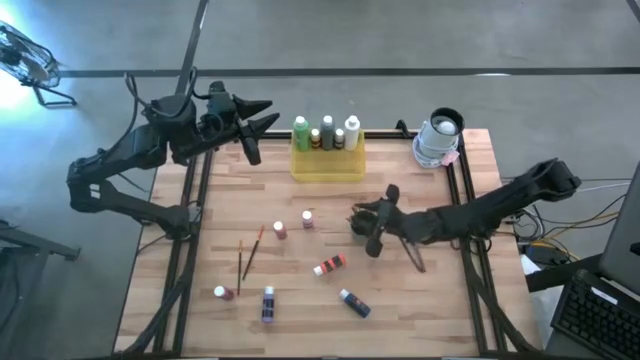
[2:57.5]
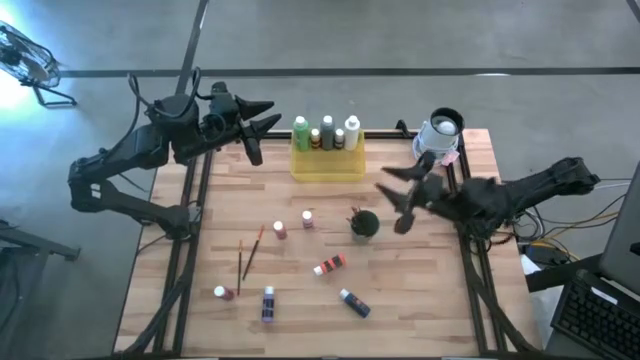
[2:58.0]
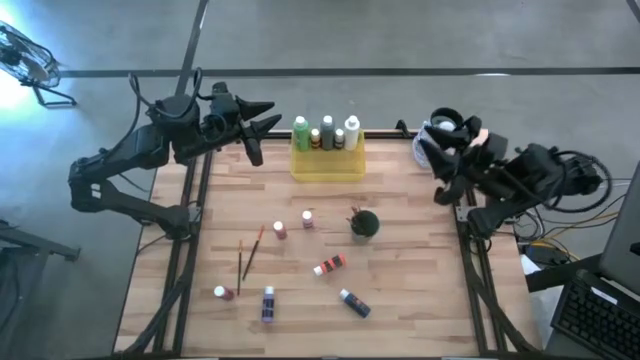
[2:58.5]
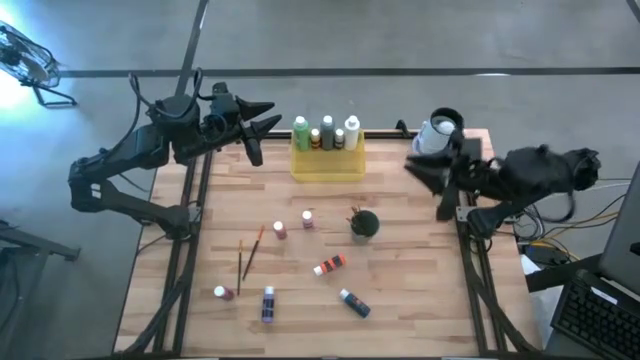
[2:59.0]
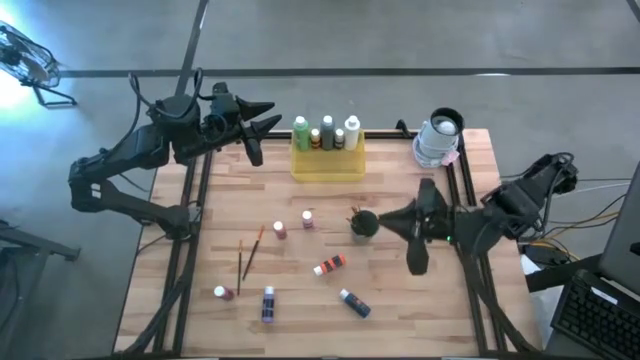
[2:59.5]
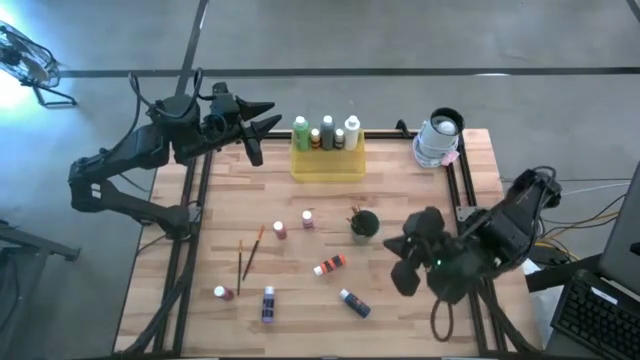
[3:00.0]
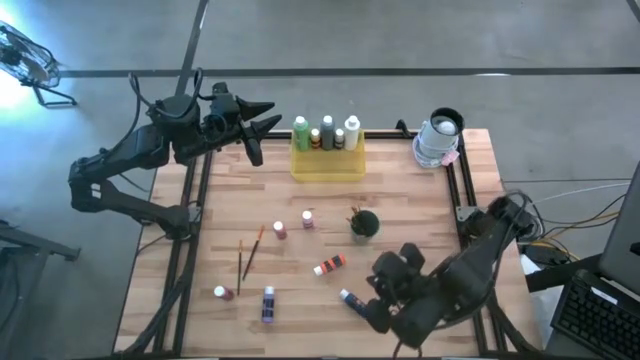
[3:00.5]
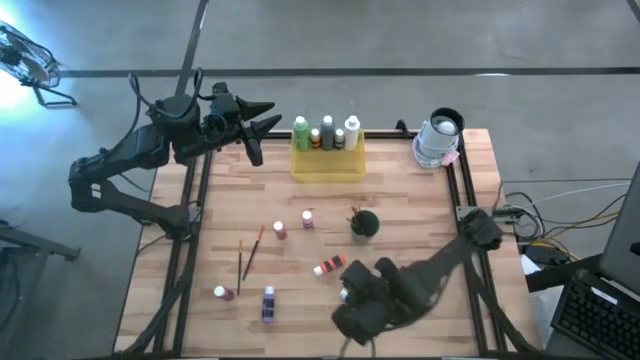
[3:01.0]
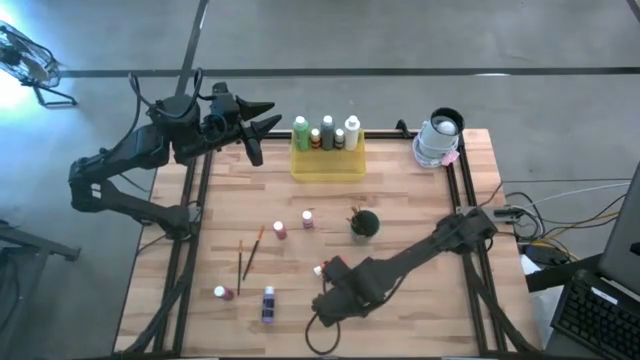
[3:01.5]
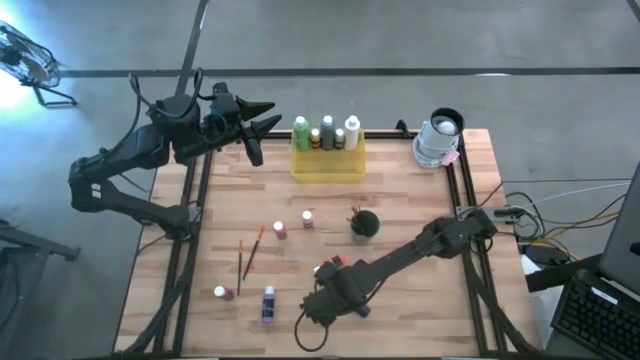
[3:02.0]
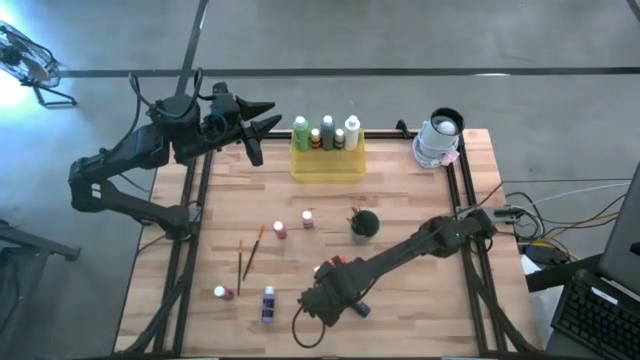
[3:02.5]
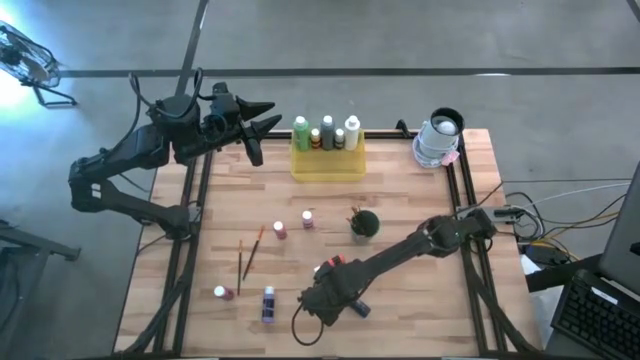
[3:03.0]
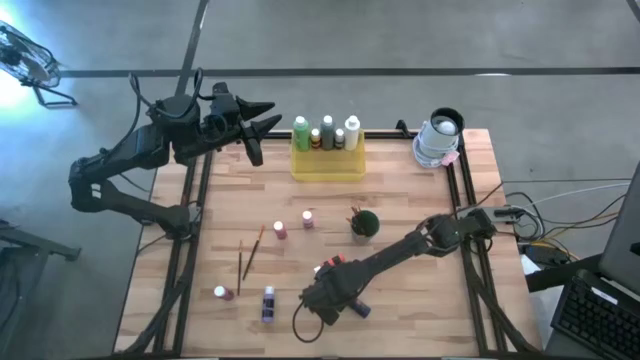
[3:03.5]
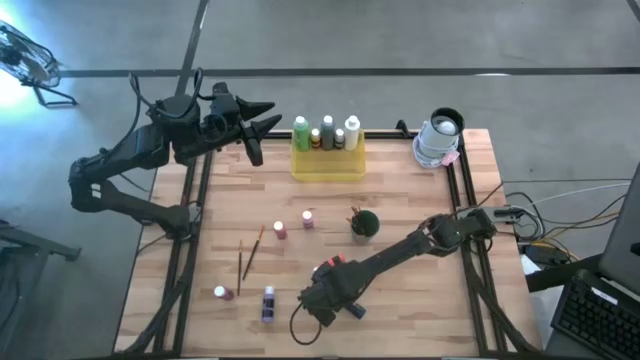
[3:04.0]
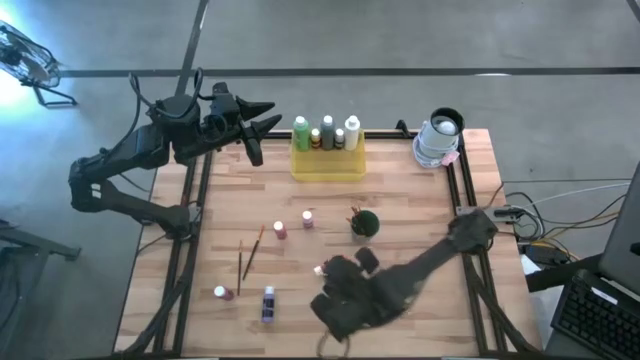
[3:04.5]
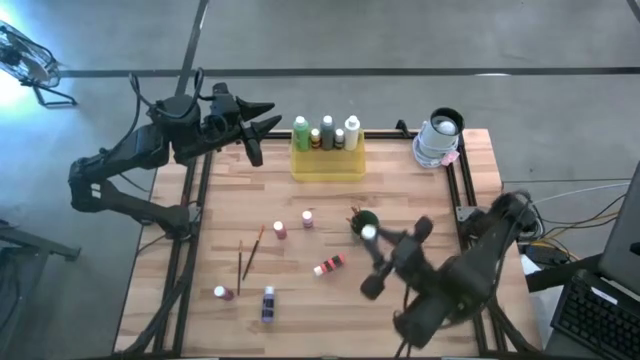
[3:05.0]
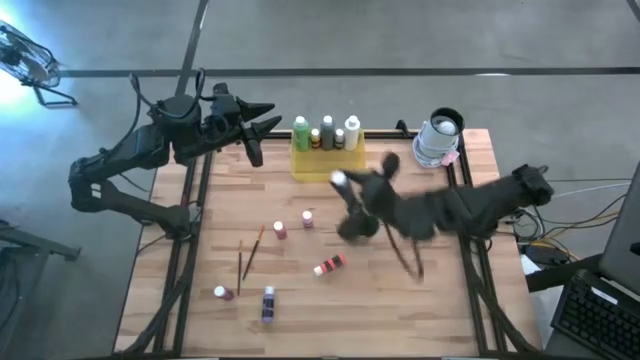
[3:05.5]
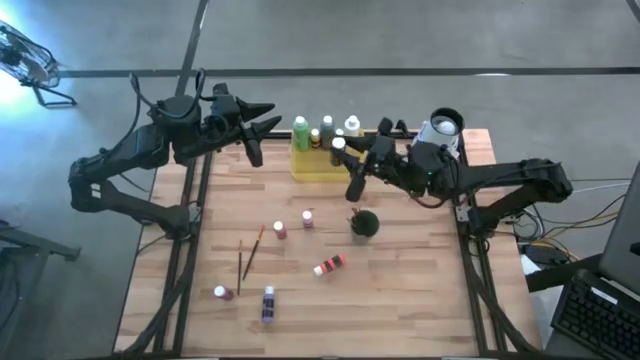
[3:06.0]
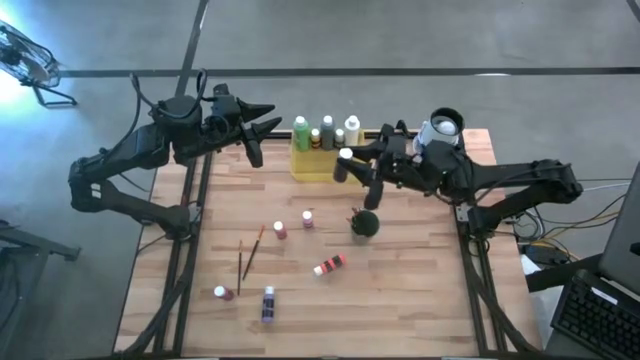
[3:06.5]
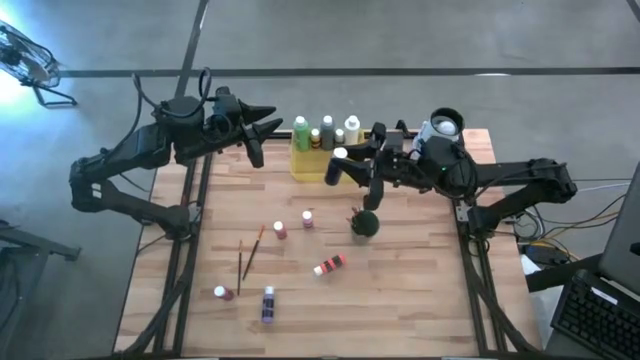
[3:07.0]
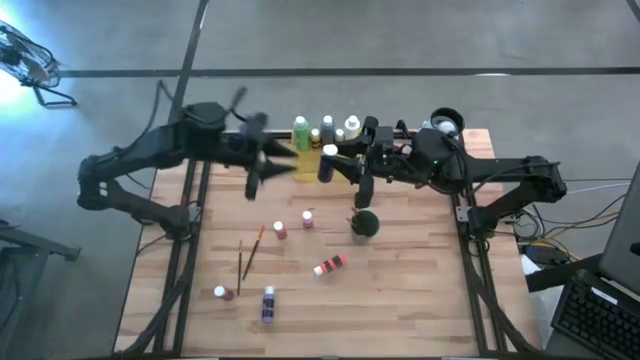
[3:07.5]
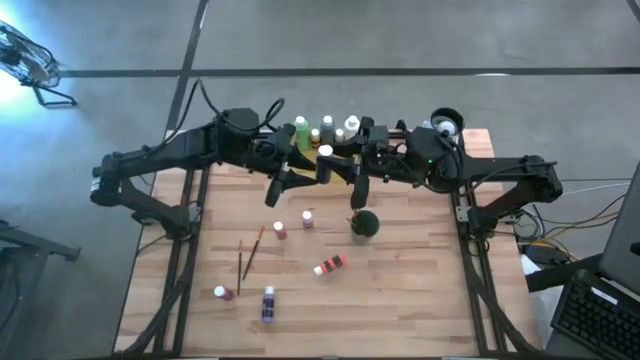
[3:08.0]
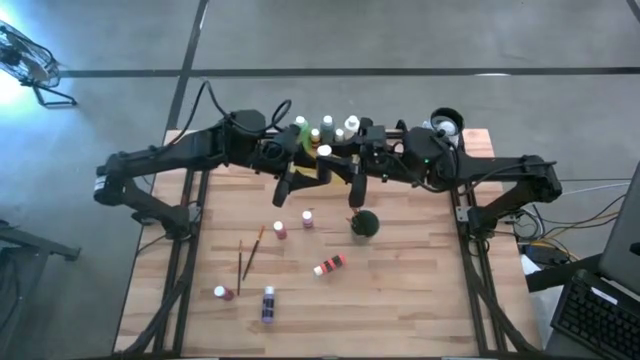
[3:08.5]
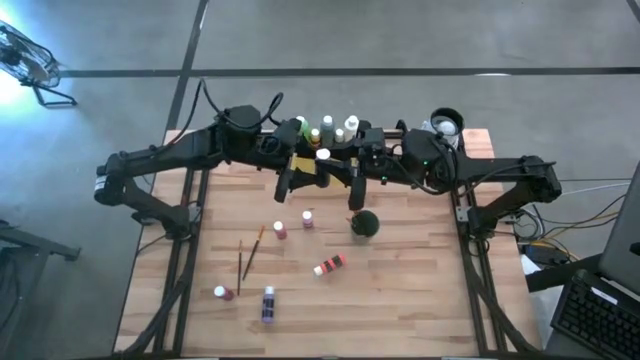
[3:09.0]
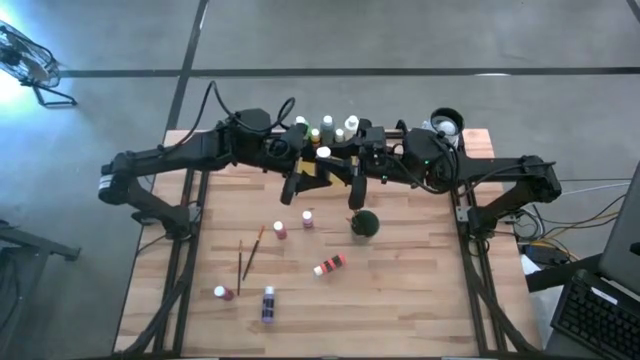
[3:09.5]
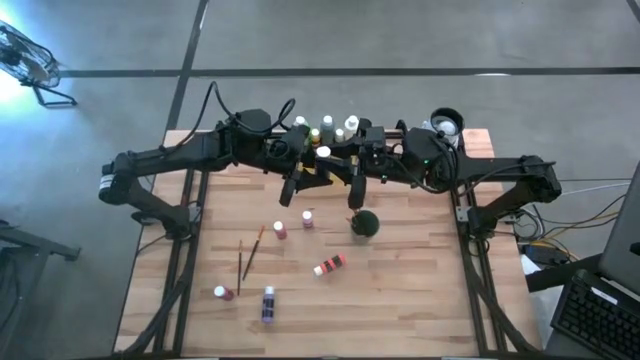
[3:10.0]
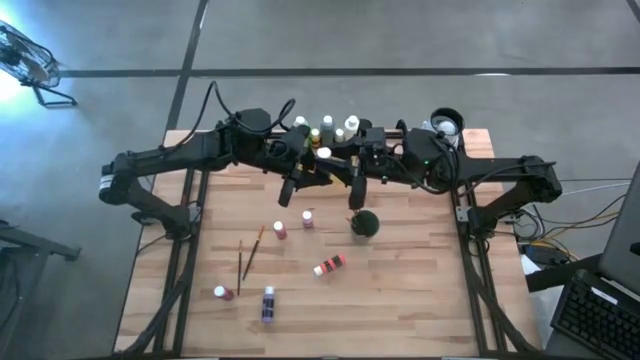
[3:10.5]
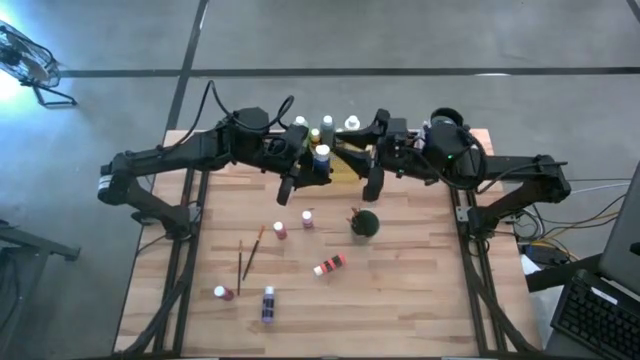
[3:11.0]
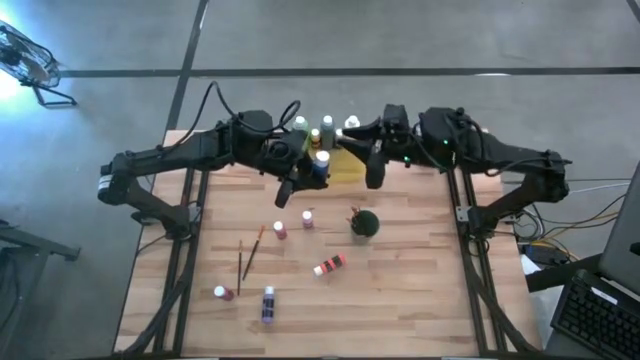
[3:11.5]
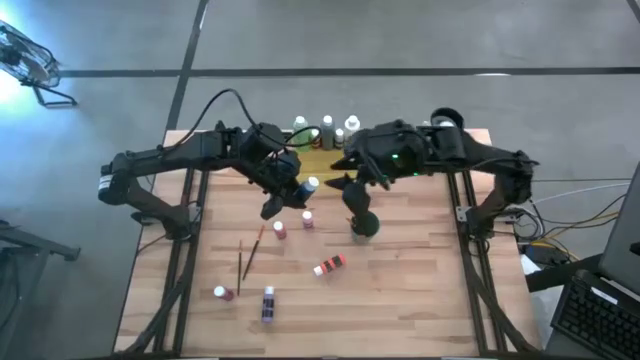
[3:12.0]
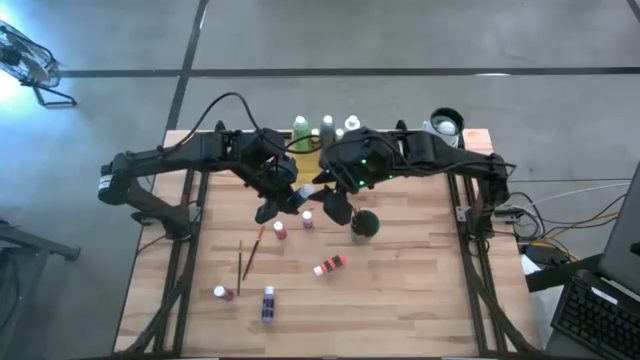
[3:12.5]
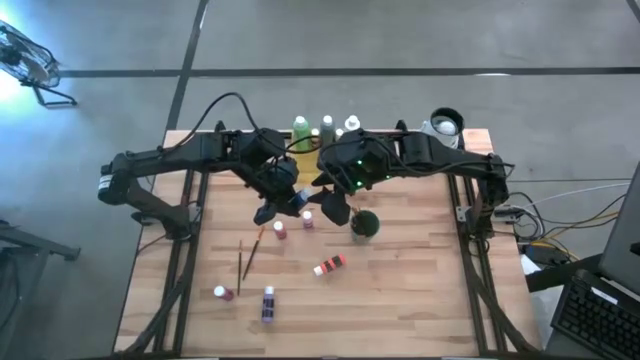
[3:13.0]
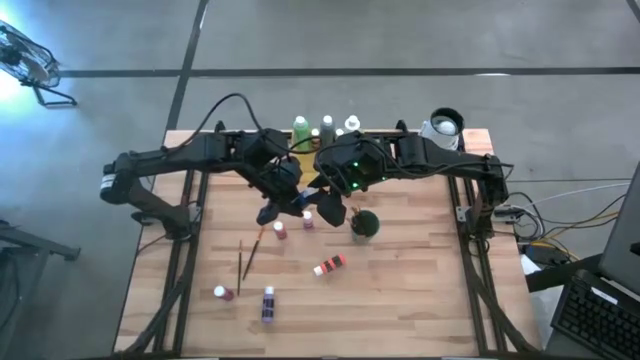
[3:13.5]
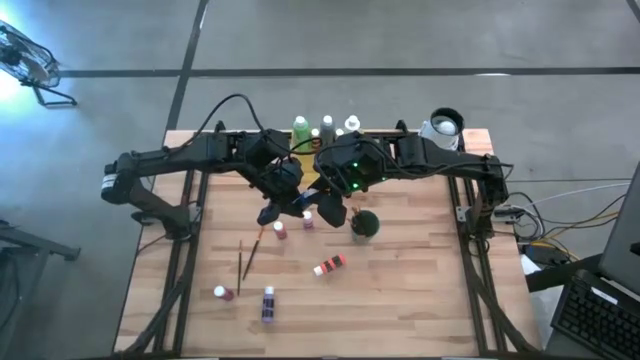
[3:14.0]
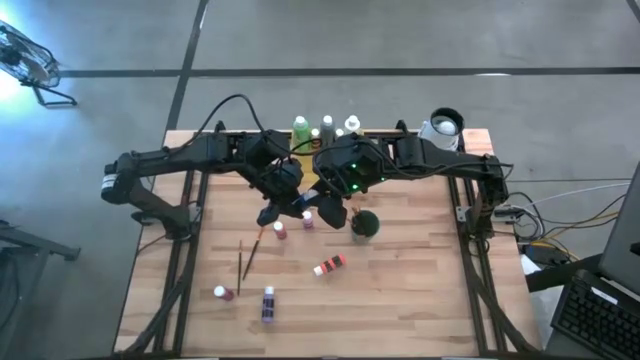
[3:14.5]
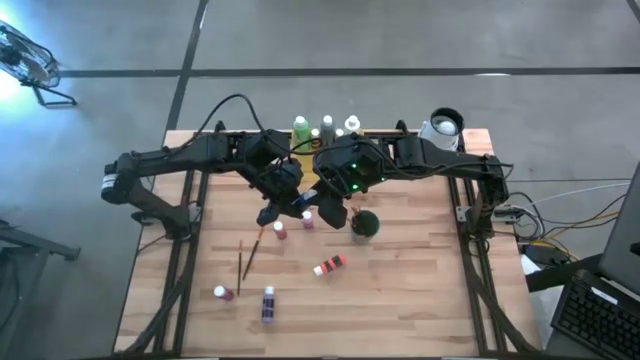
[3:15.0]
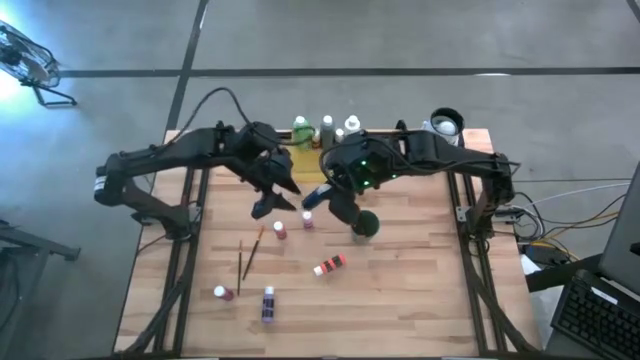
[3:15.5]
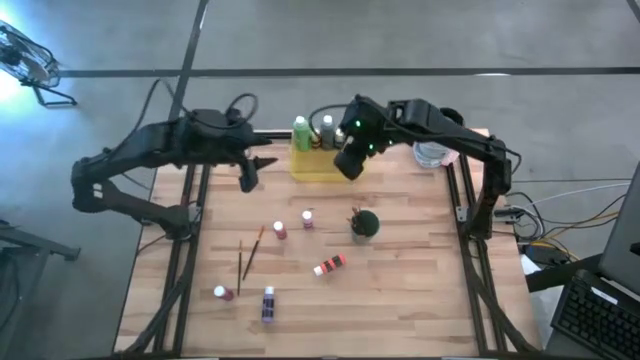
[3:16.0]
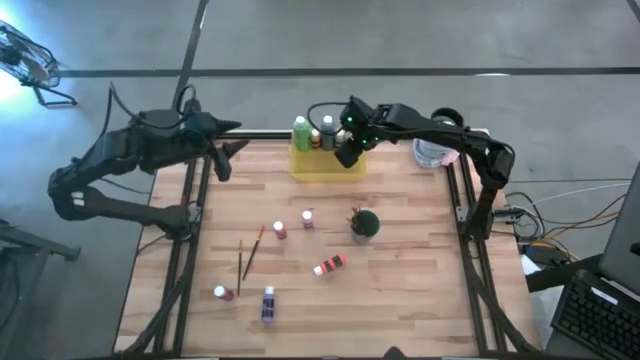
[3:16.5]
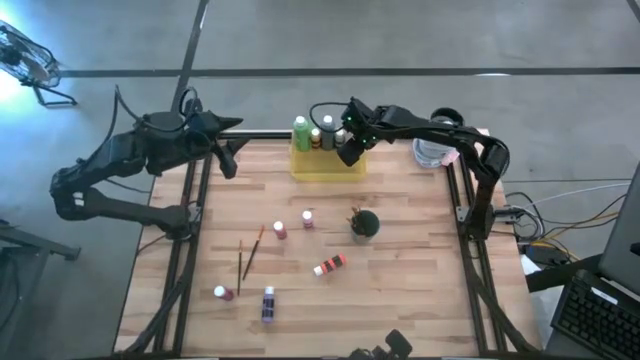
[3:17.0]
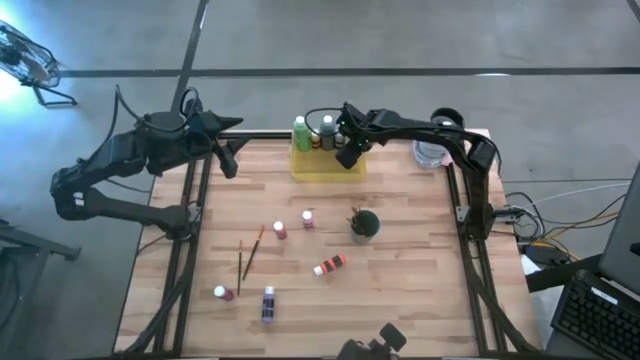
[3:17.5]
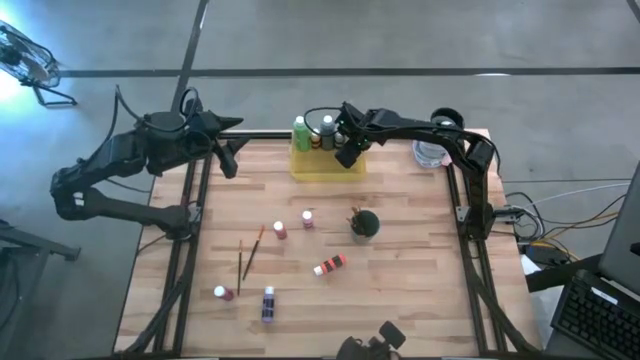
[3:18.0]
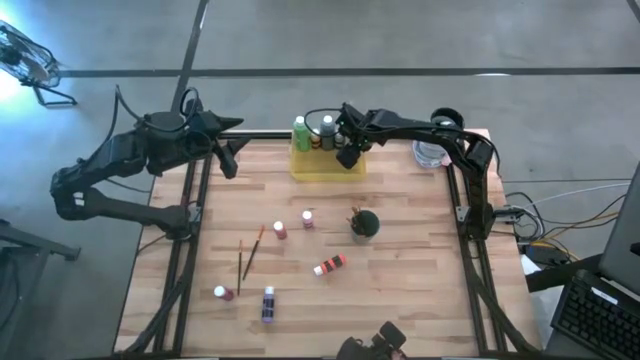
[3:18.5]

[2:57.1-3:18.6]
Task: Pick & Place Paint Supplies
Put the blue paint bottle into the yellow bin

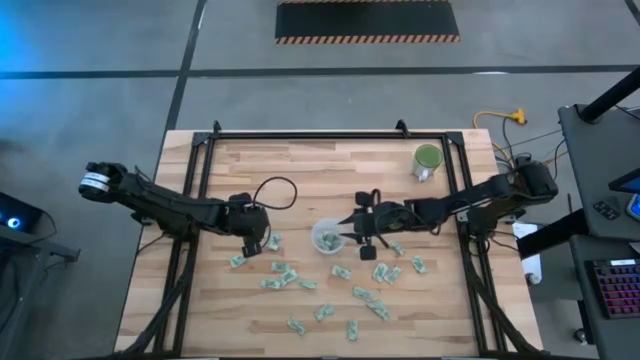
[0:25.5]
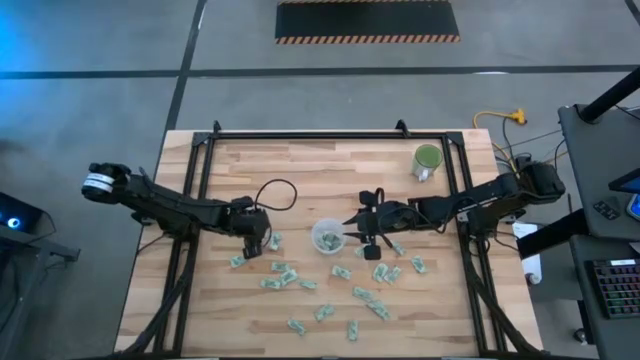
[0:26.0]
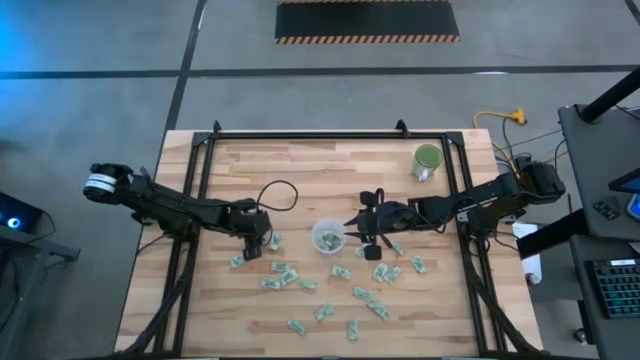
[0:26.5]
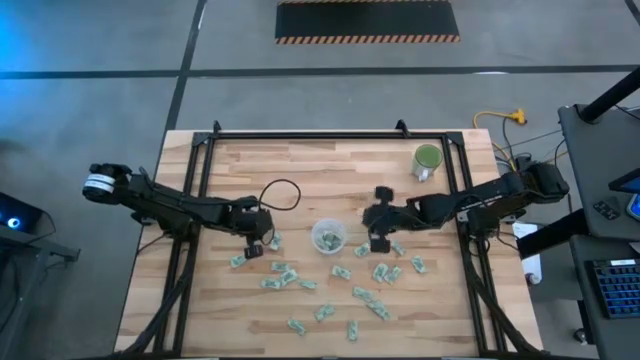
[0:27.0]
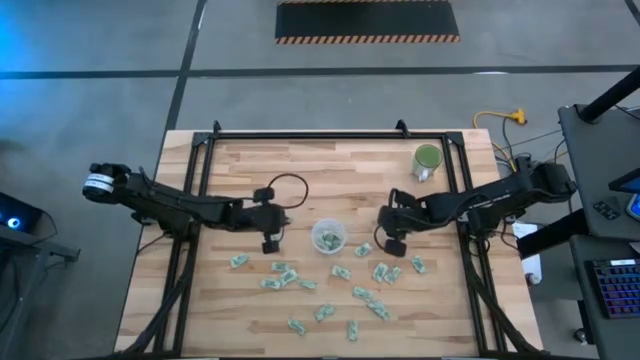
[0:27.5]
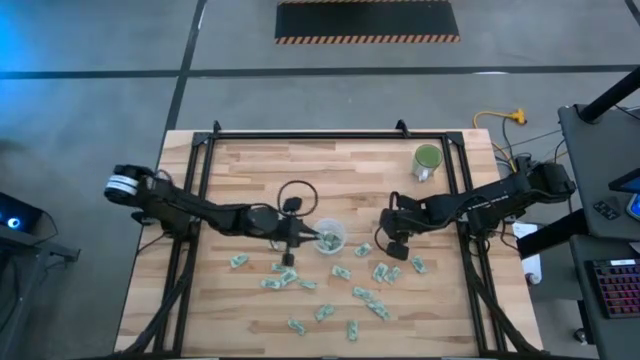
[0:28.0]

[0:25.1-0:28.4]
Task: Pick and place Stevia / Truvia into bins
Put the light green stevia packet into the transparent container
